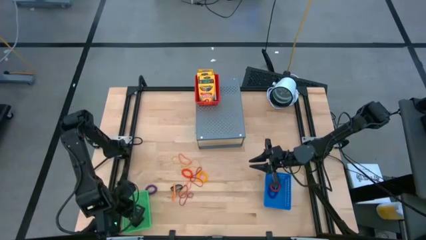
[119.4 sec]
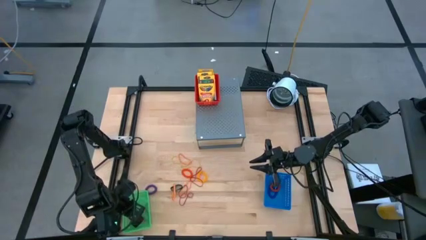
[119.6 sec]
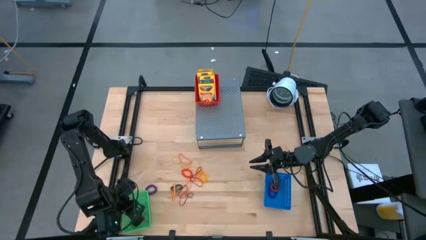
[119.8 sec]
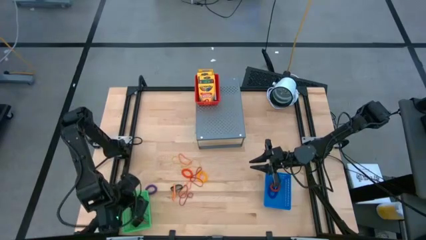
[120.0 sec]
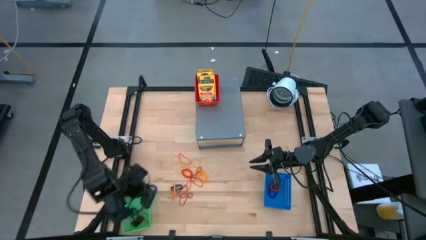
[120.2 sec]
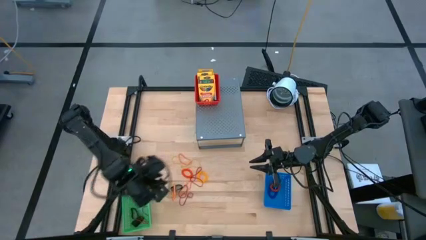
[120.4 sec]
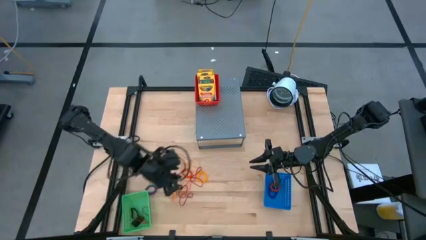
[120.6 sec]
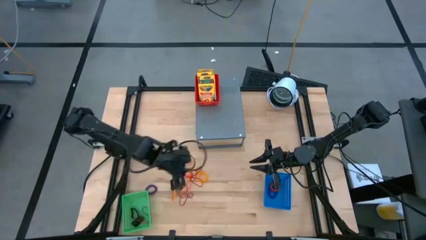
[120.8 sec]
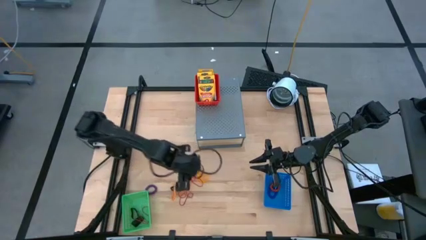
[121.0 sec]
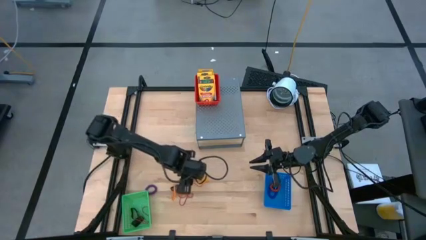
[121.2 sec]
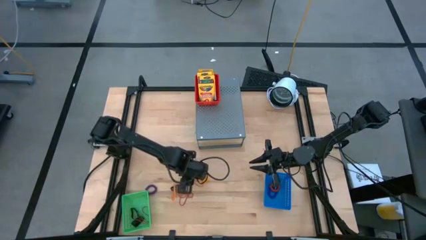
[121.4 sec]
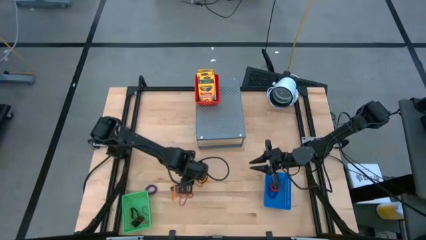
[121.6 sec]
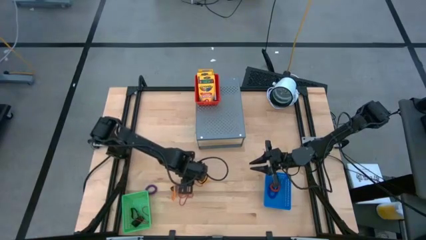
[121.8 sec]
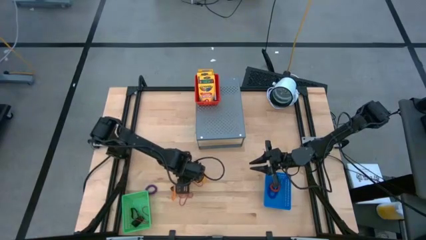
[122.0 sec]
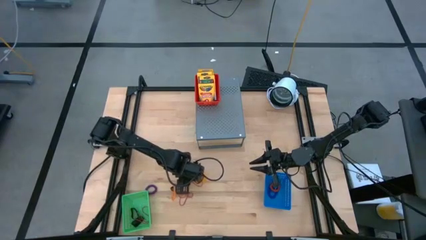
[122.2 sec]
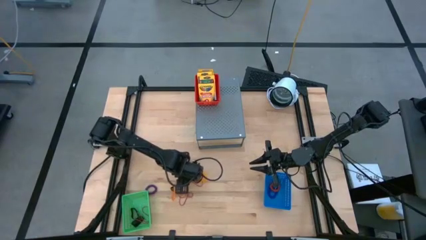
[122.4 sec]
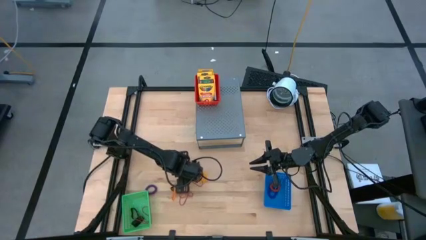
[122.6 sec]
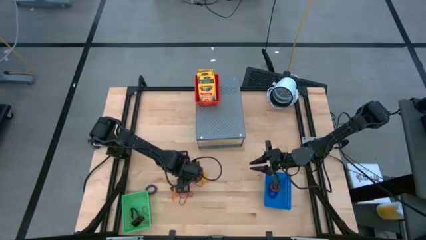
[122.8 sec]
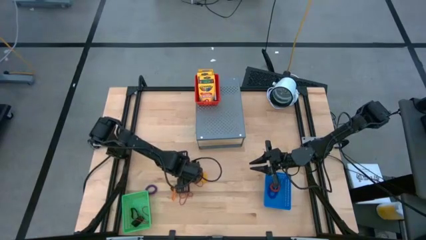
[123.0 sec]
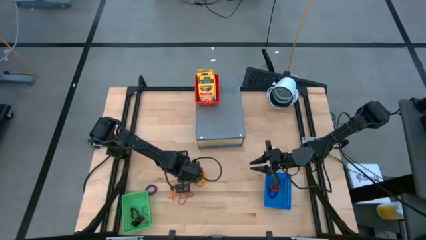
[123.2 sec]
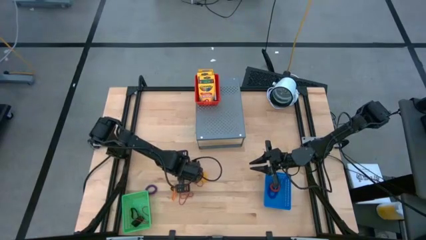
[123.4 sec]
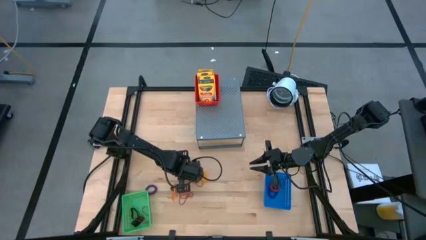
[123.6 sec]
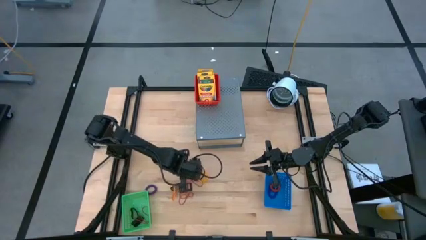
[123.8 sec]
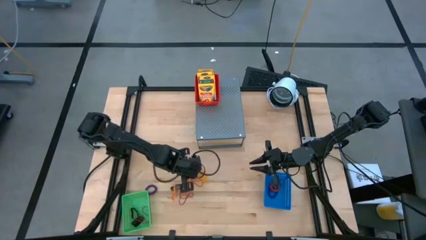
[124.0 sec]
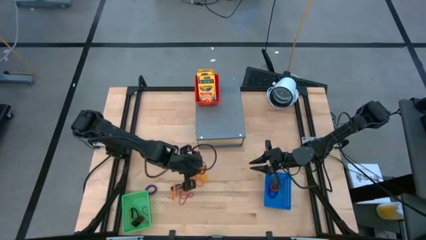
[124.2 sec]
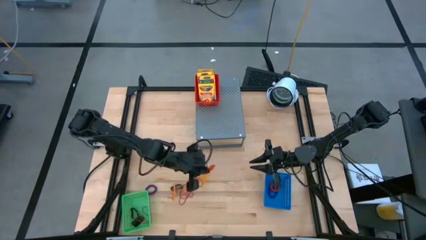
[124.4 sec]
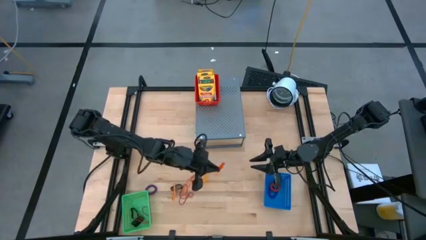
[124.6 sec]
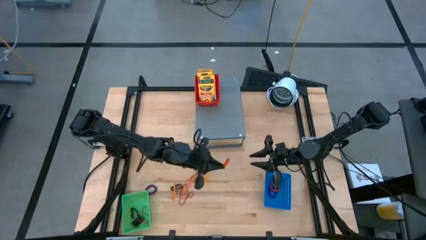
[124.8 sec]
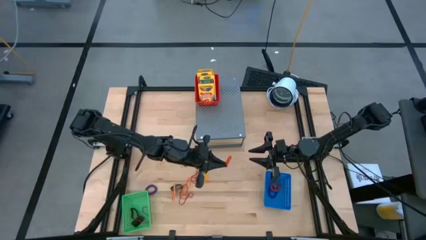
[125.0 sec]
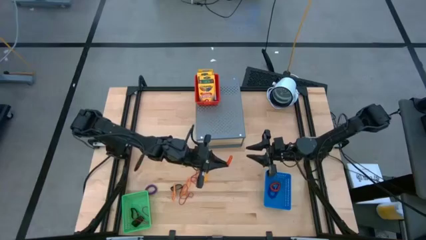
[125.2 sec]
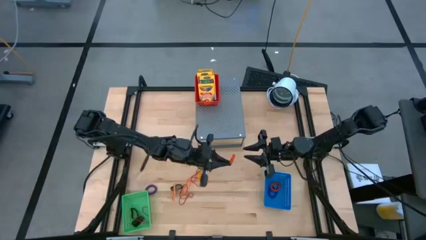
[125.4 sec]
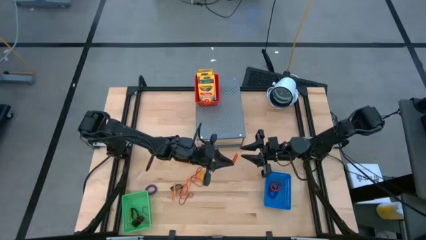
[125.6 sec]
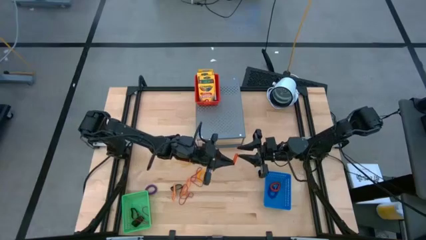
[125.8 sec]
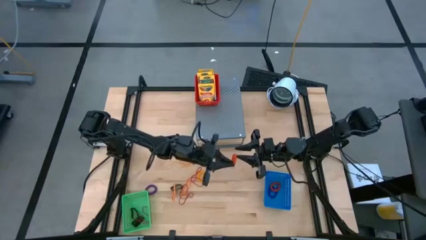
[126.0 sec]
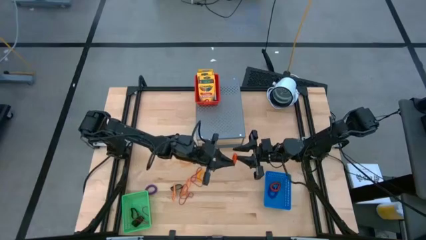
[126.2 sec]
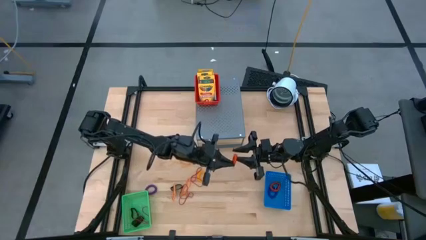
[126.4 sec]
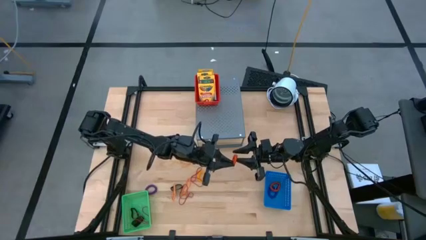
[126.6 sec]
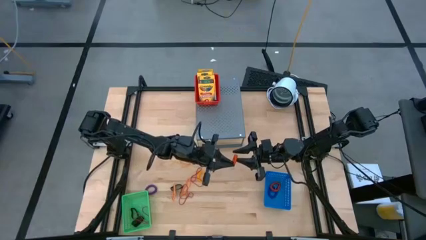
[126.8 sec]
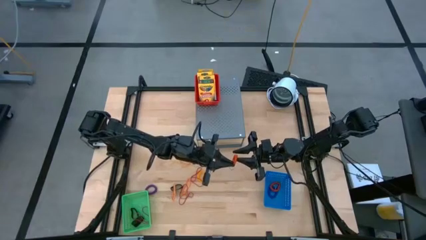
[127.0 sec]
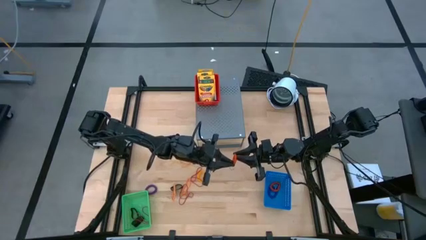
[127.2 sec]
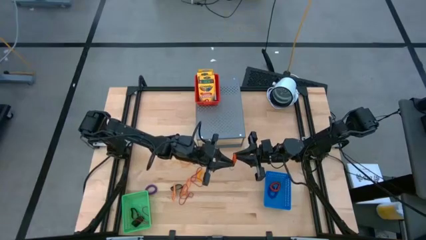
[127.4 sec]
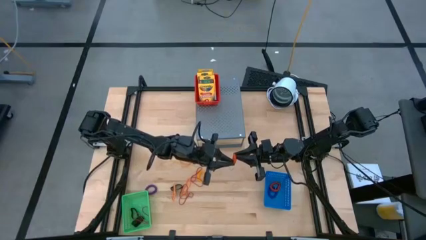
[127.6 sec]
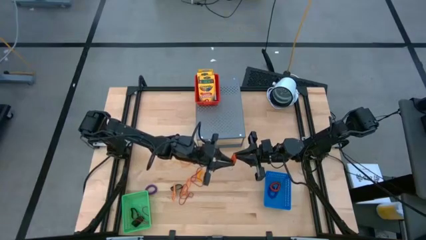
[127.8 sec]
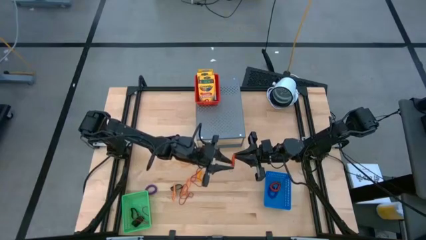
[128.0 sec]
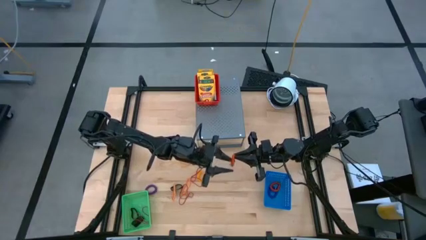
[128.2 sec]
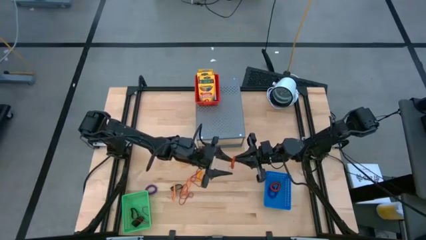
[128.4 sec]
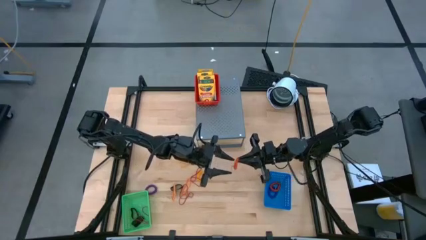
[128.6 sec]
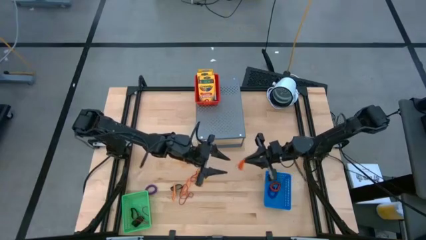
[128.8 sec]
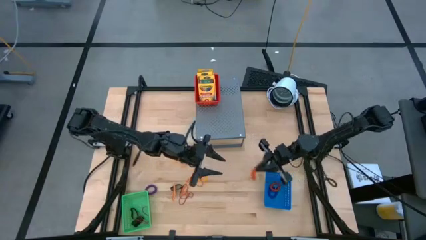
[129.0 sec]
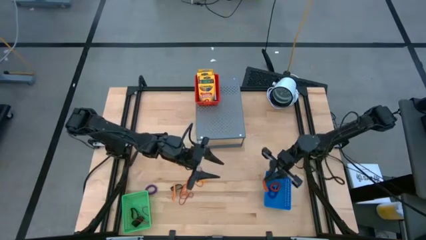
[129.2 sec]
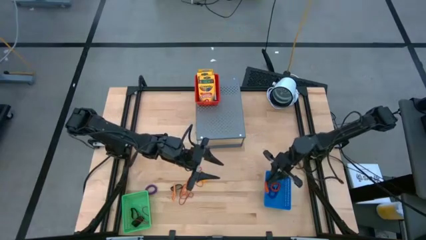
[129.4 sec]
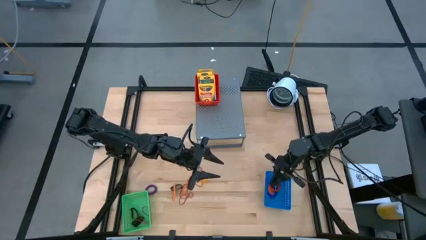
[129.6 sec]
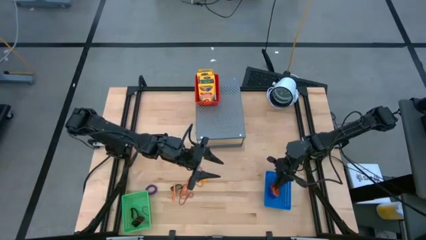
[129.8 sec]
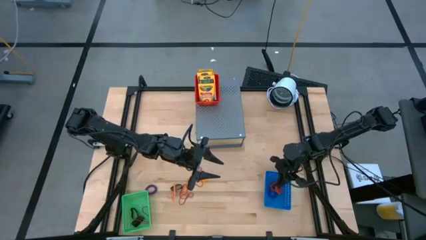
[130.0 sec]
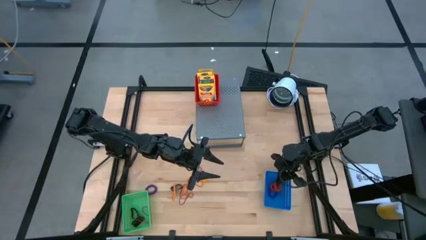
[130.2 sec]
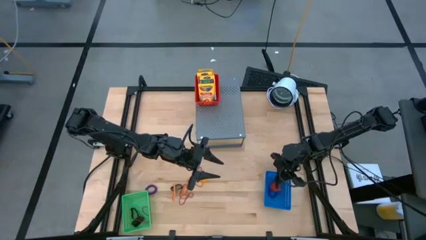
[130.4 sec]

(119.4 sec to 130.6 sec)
Task: Pick & Place Office Desk Supplies
Put the orange spring keychain into the blue bin

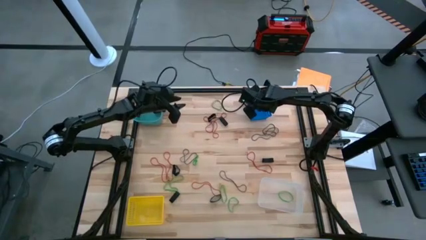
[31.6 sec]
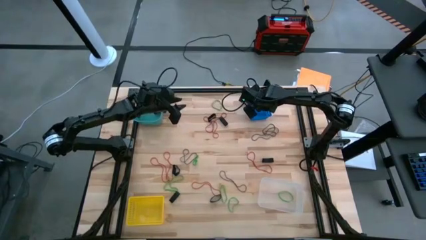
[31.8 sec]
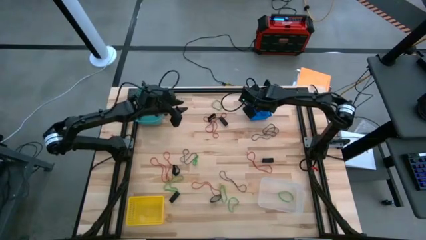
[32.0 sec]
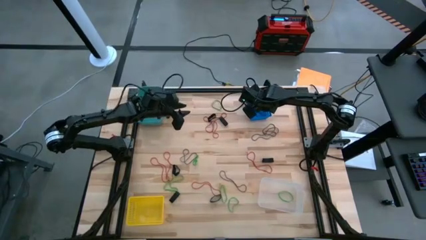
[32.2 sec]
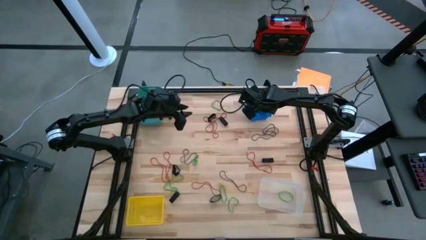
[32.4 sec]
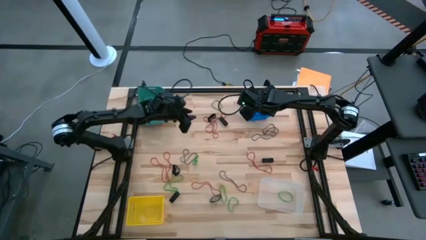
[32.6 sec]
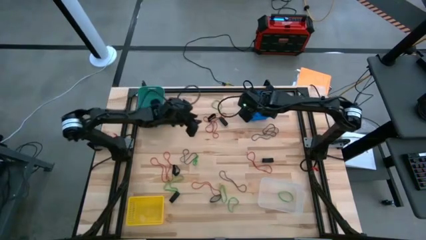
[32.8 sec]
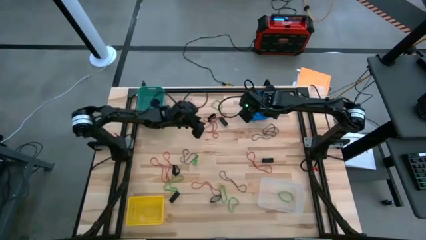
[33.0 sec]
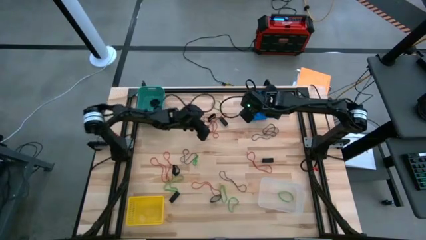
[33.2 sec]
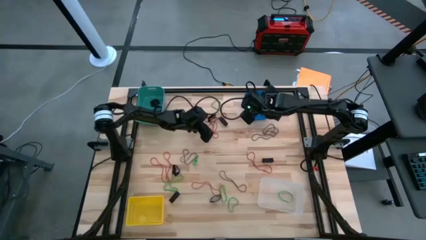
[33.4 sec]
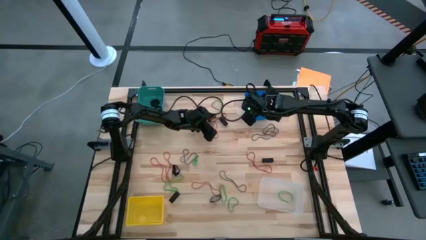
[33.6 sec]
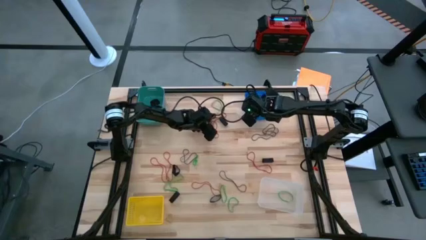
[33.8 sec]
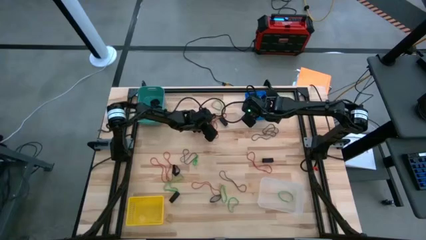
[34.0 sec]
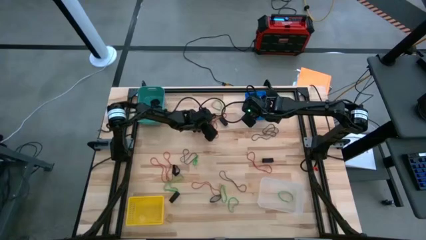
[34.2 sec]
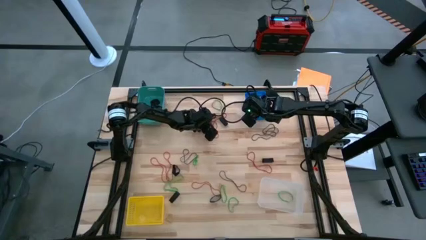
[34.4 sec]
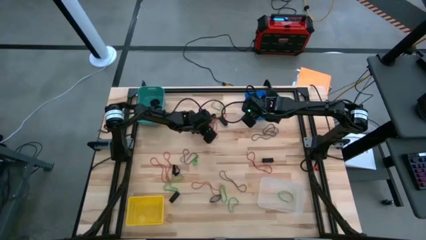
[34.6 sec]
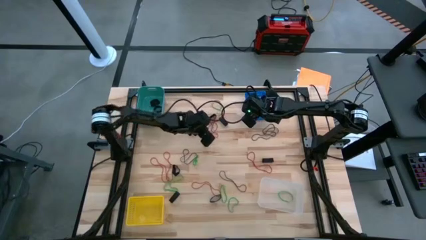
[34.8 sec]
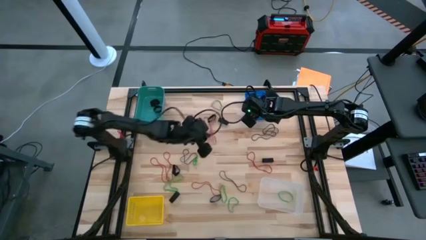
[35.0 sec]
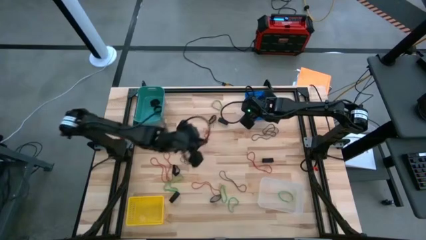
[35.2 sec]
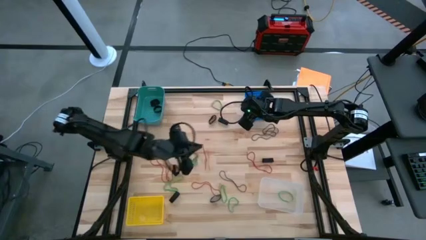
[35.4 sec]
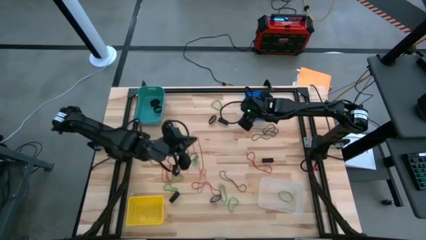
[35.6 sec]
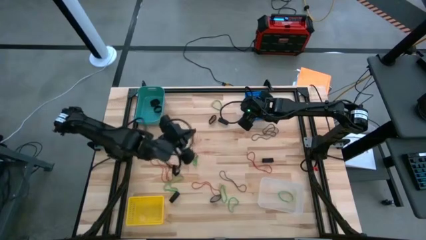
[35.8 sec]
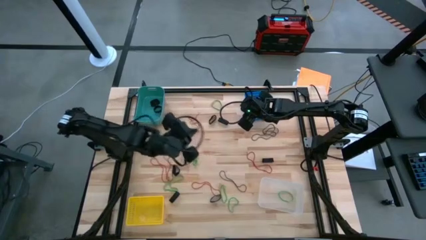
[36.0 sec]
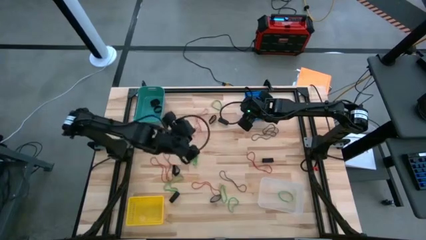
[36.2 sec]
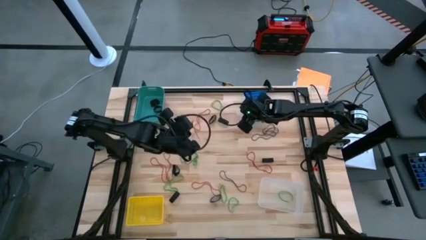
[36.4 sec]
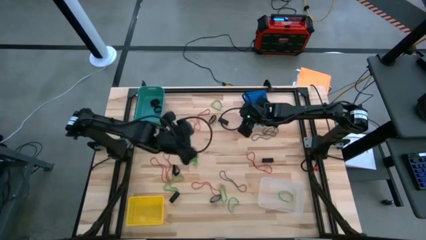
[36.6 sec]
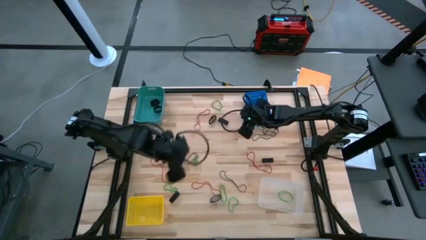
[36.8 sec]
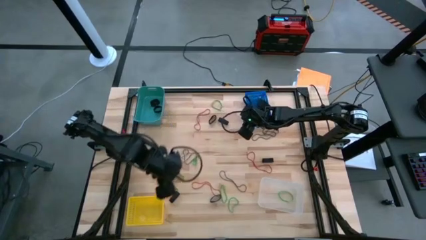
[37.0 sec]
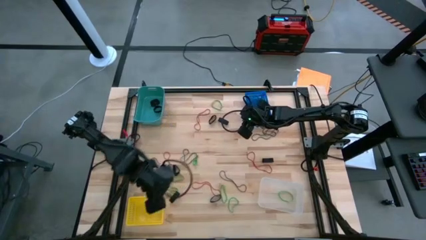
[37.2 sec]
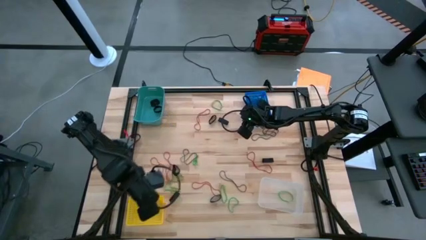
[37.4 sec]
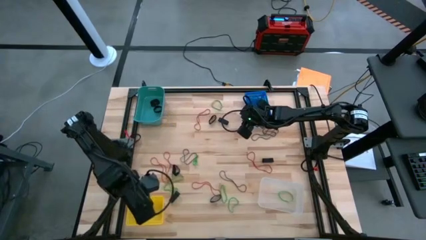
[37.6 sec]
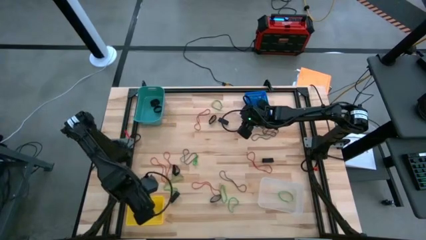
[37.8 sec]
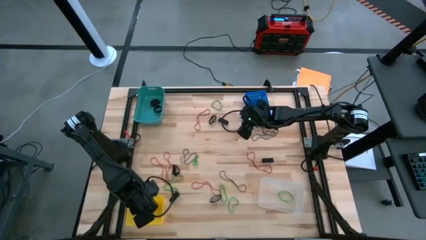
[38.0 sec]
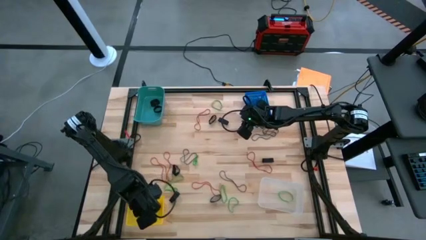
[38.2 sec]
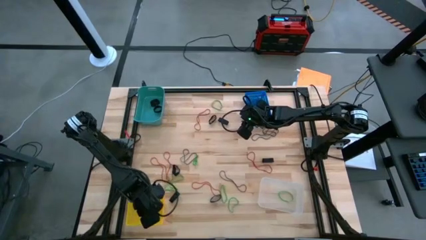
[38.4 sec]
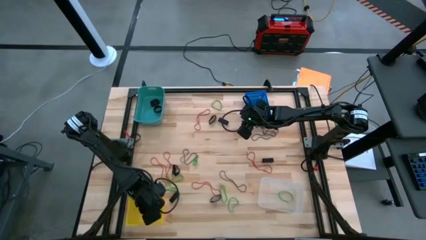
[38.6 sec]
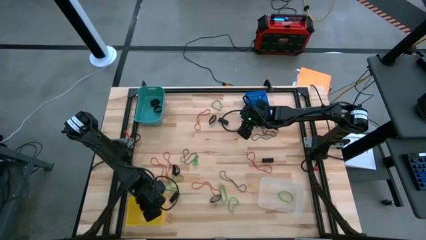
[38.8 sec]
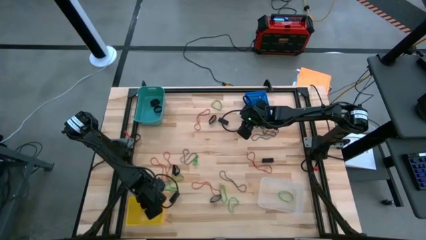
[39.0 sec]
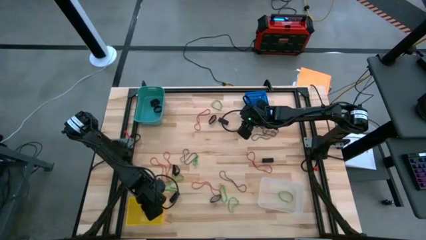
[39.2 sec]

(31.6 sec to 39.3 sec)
Task: Sort rubber bands into baskets
Put the red rubber band into the yellow basket
